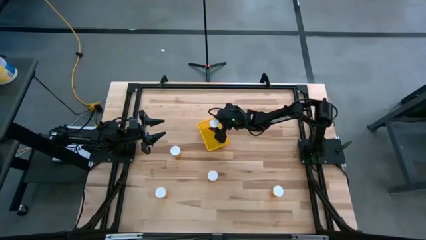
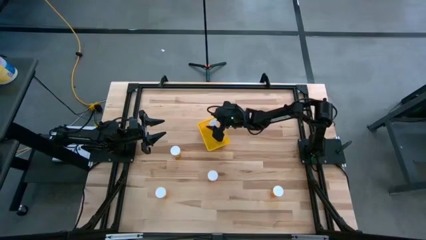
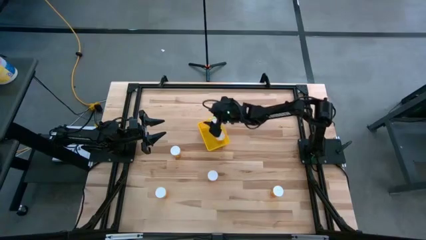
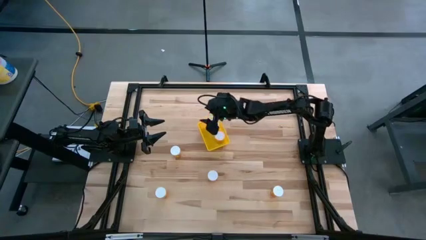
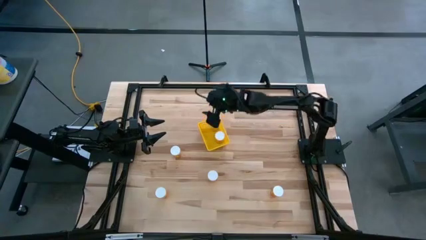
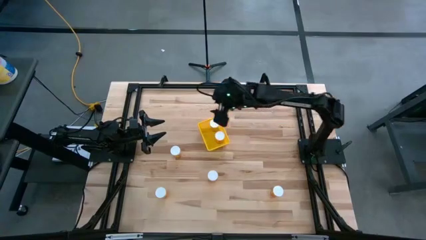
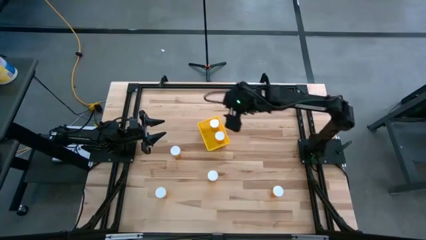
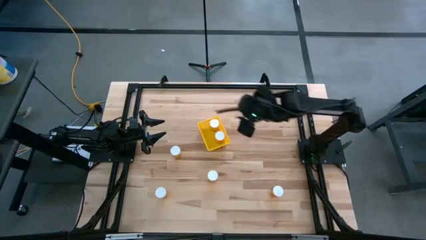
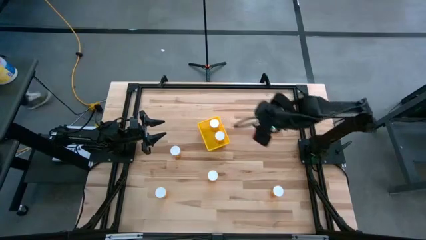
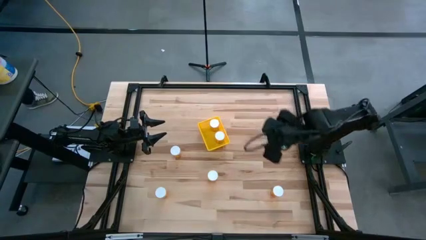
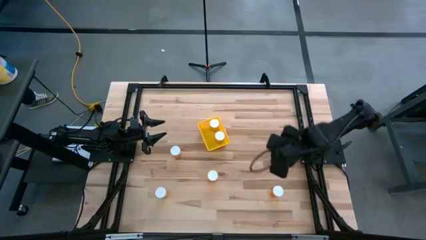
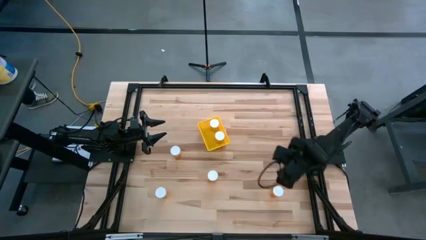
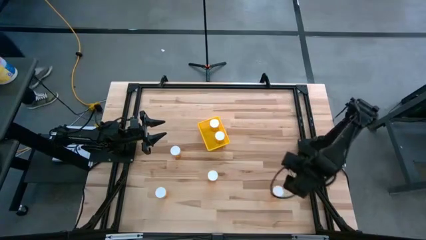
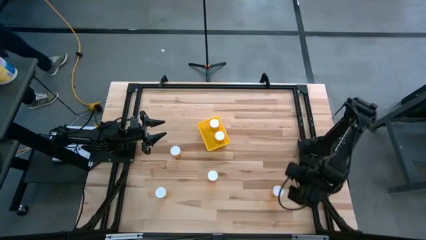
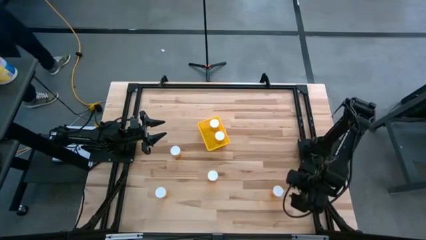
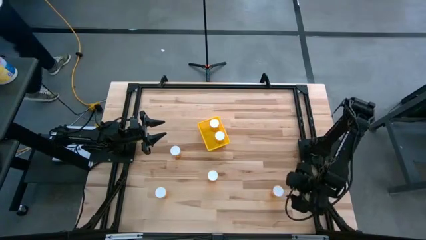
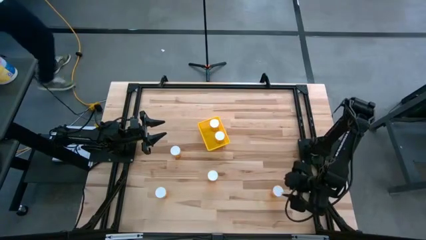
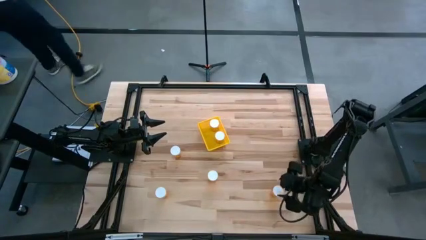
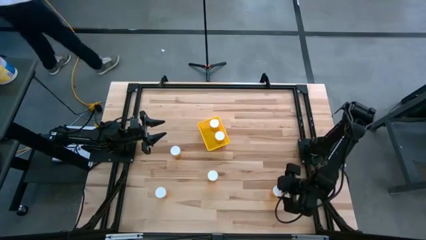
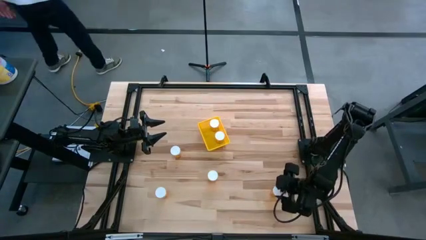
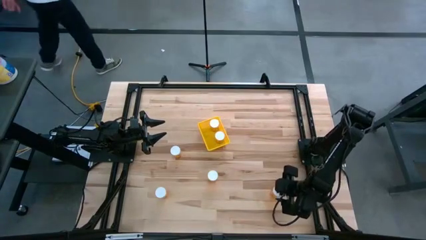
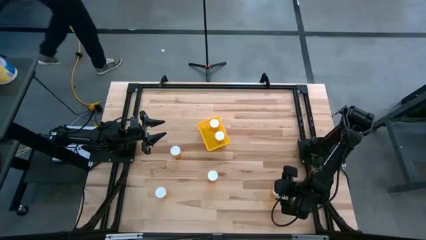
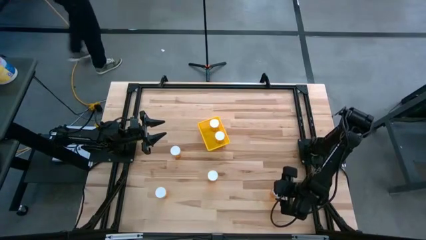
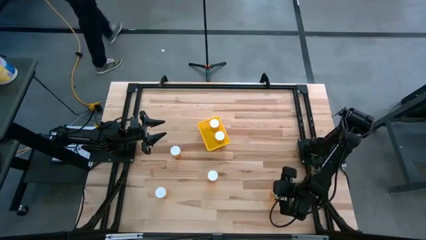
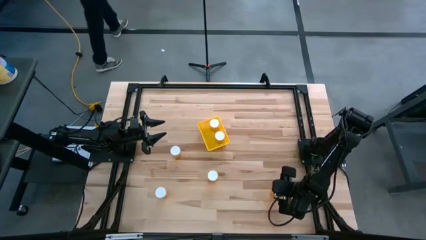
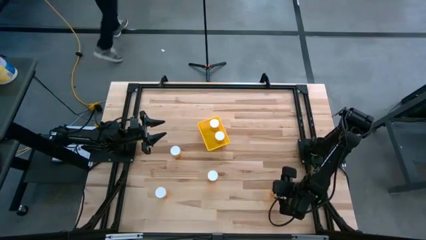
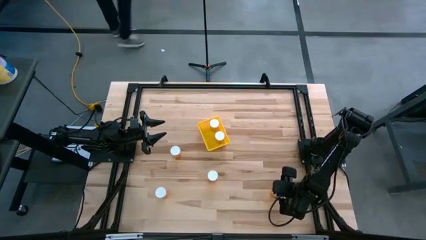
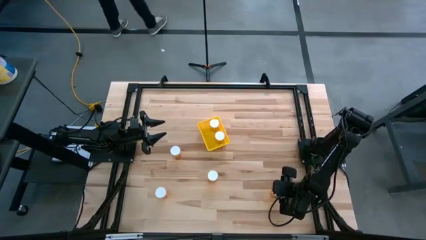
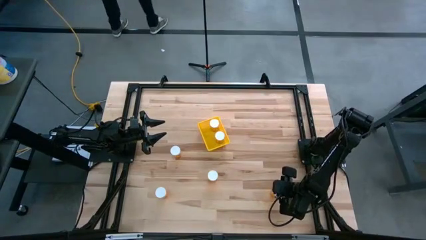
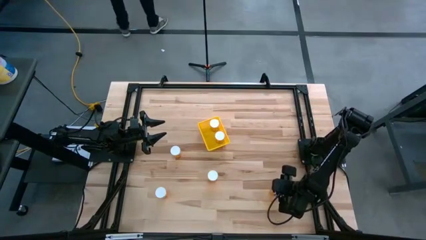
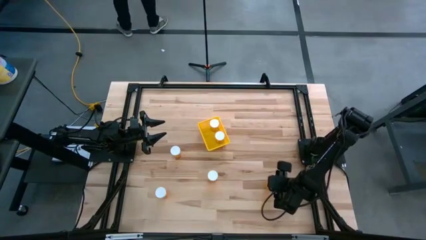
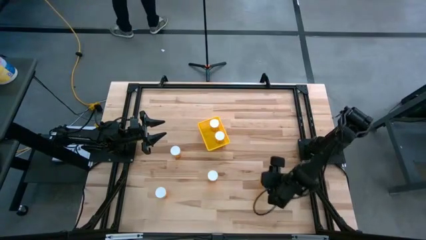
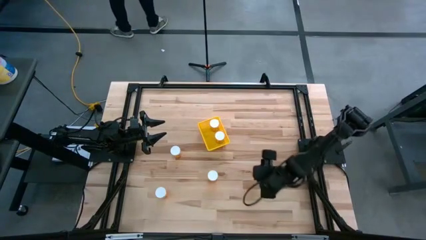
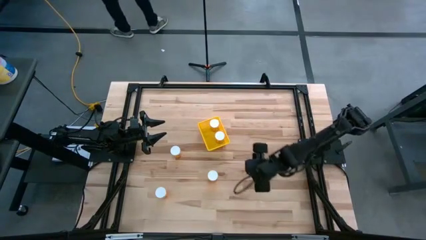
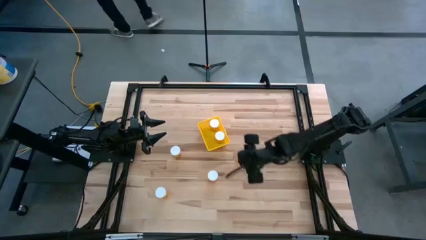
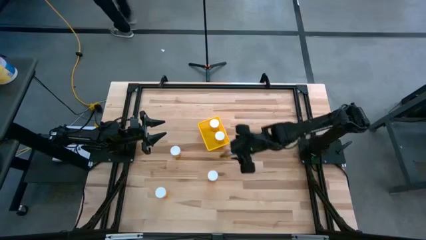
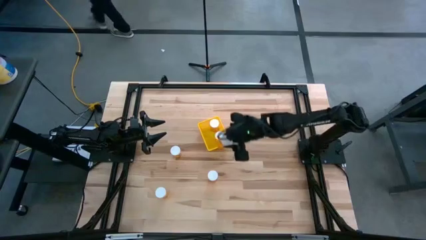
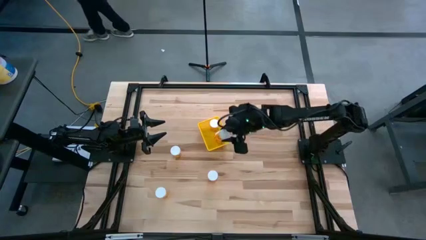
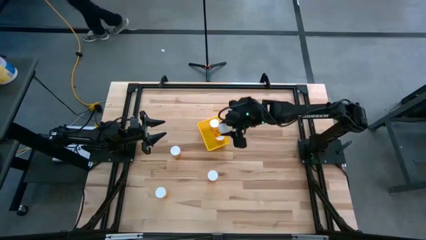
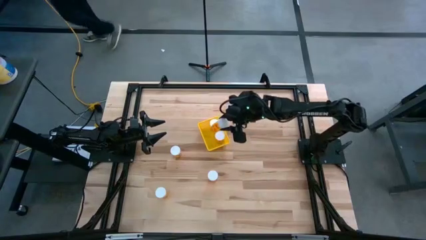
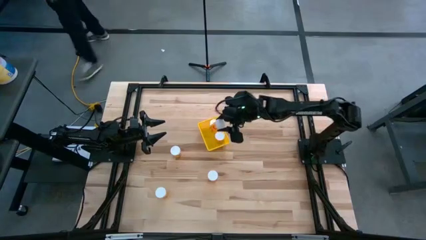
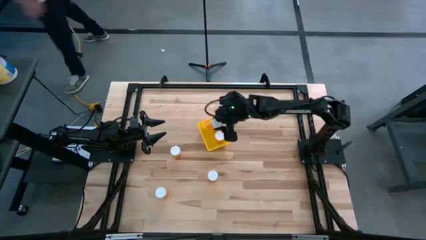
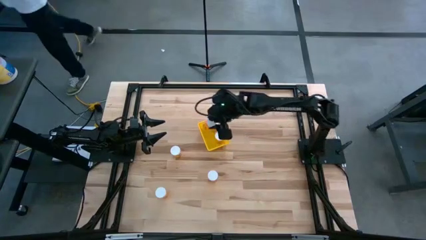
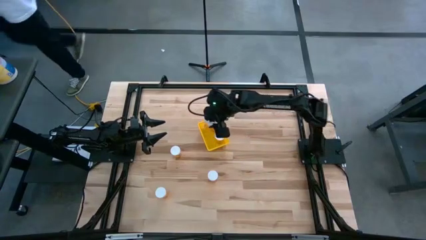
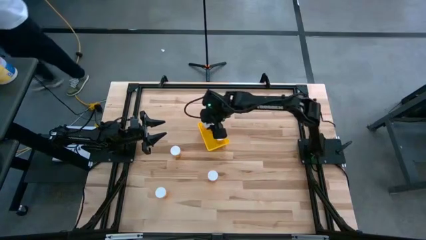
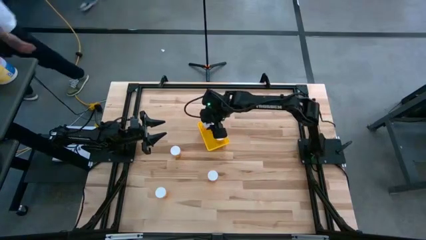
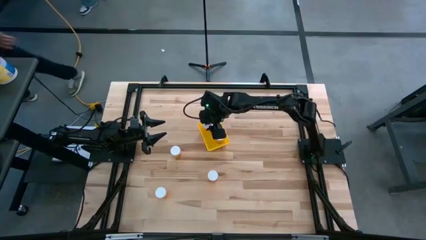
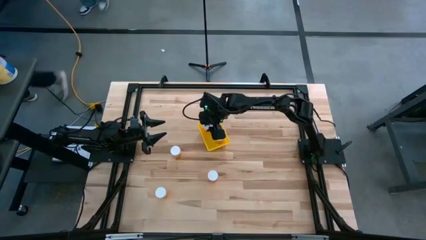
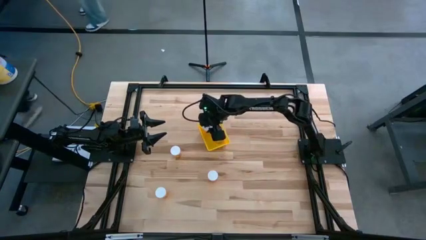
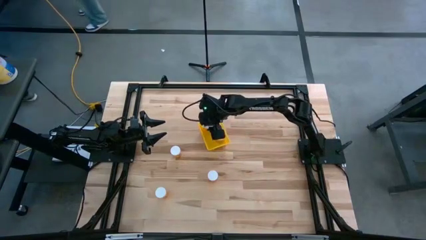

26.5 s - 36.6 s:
Task: Pick and place pill bottles into a basket
Put the orange pill bottle into the yellow bin

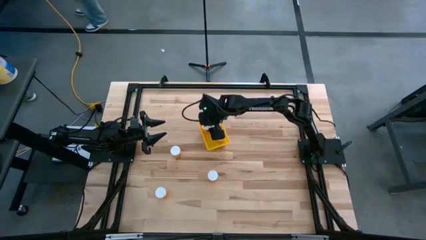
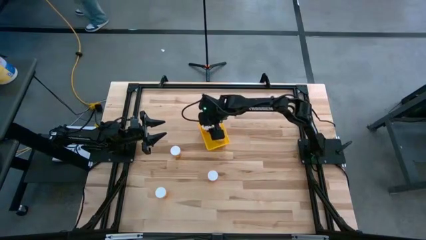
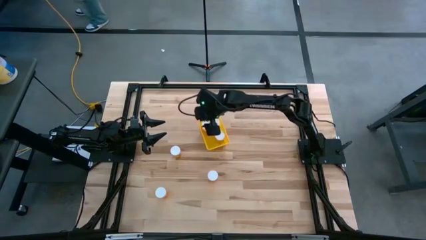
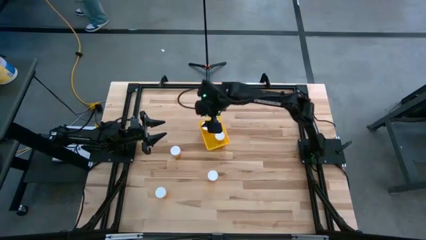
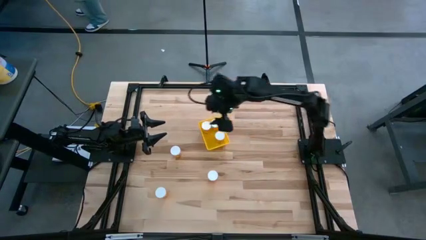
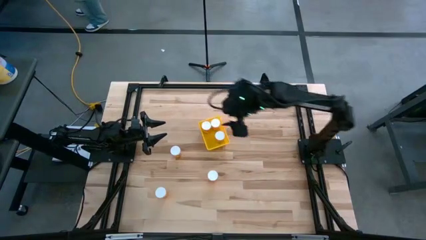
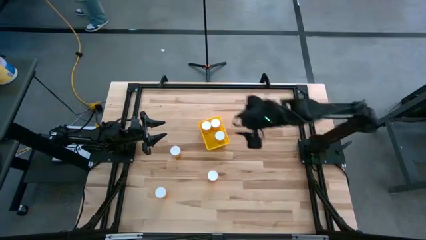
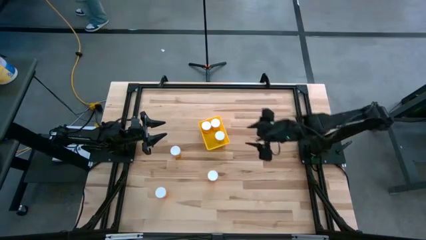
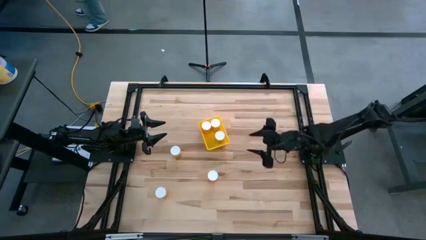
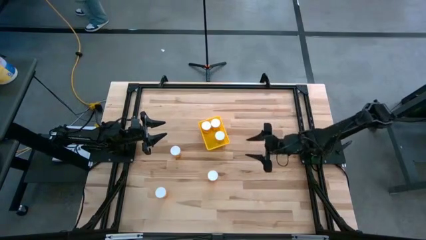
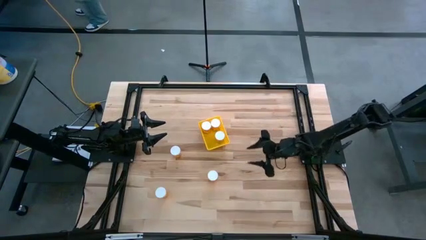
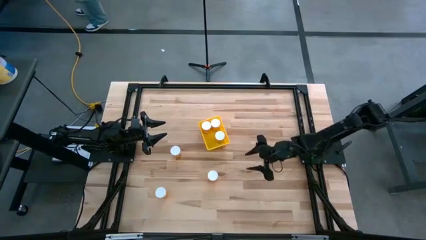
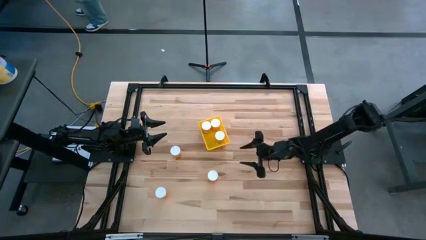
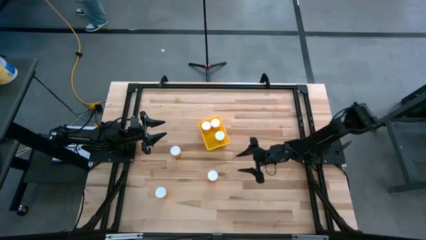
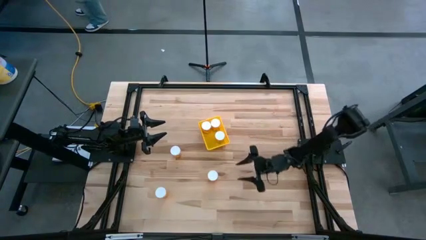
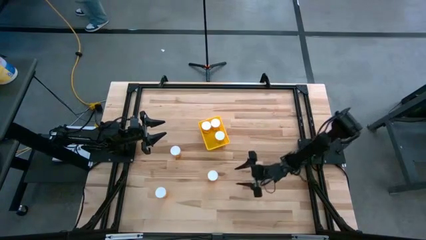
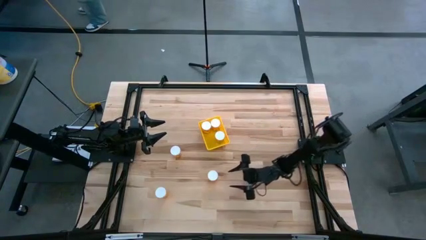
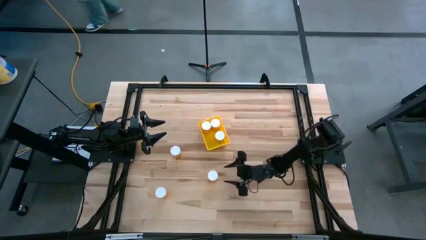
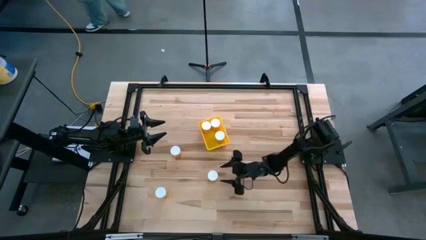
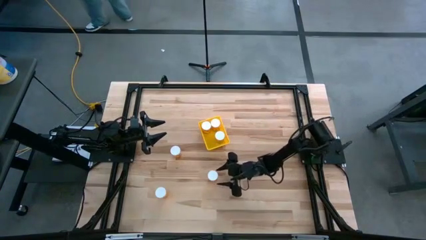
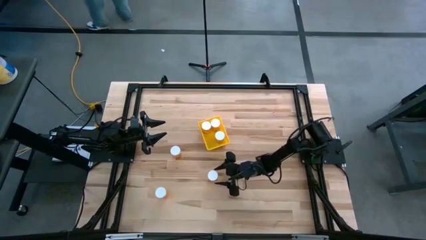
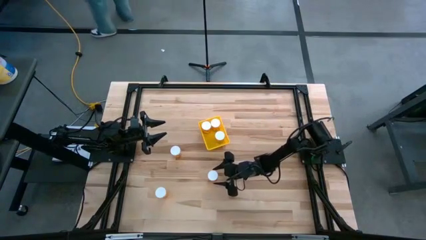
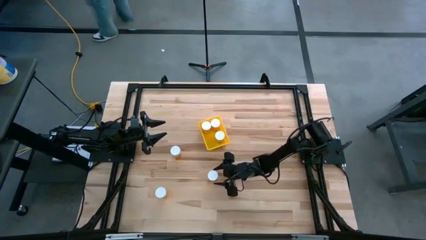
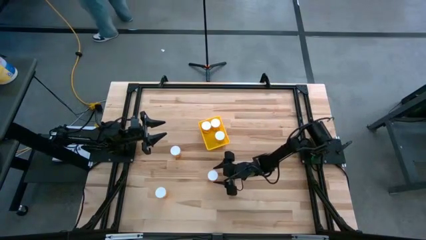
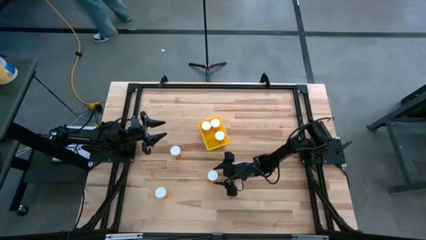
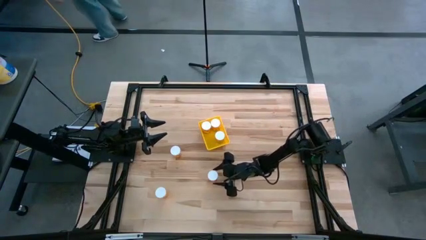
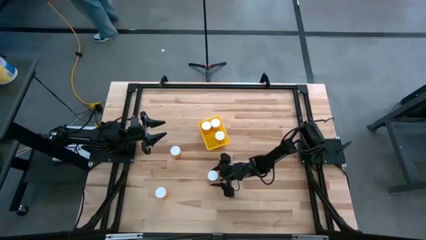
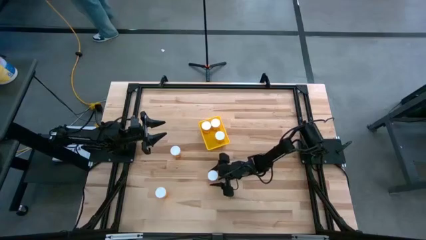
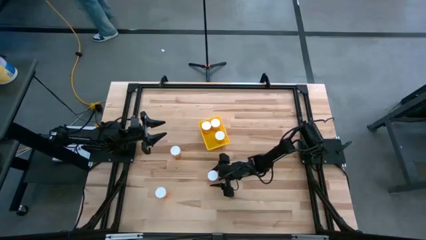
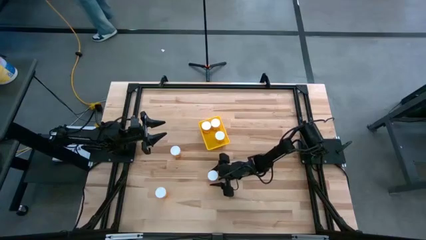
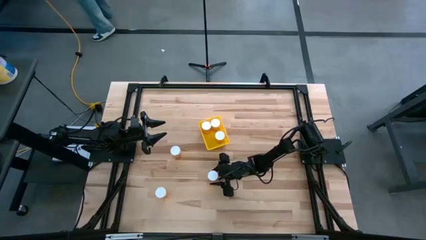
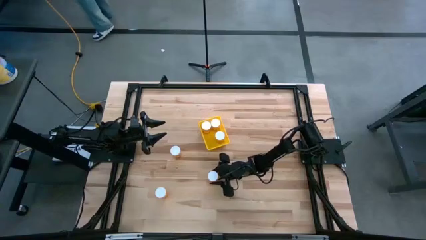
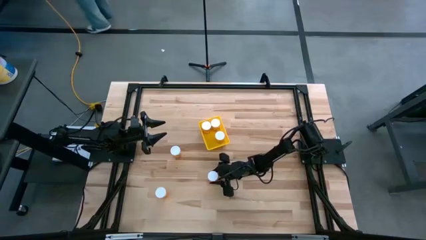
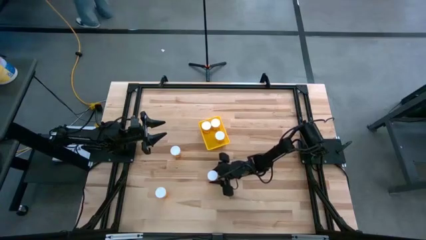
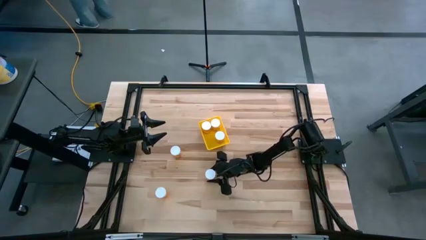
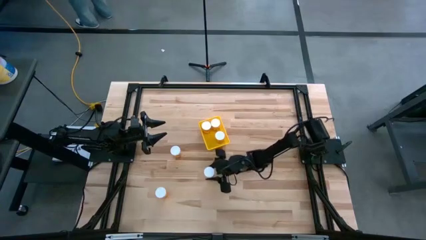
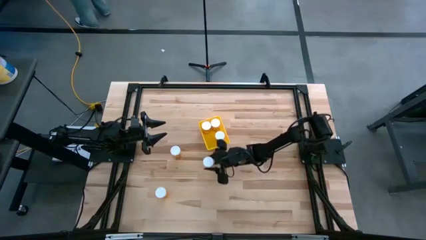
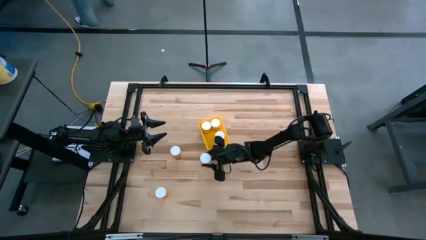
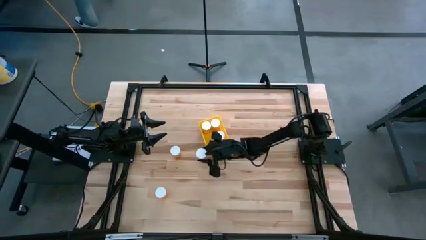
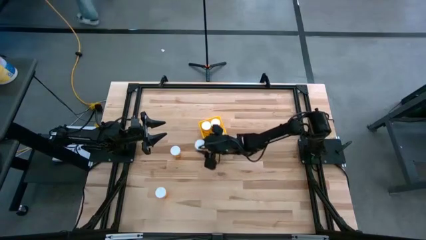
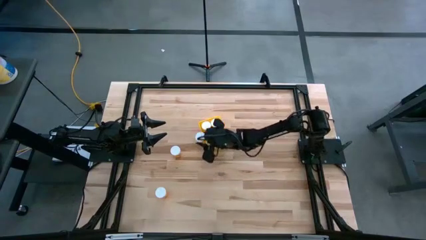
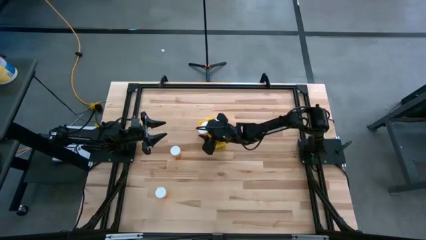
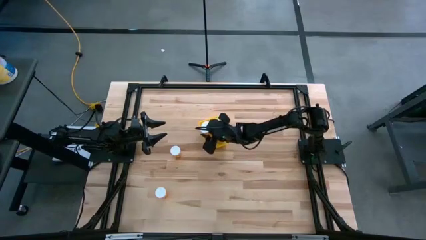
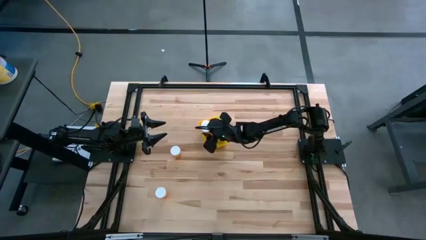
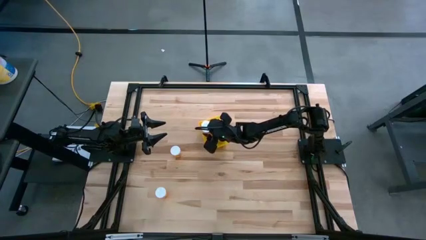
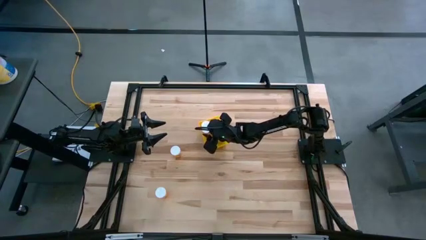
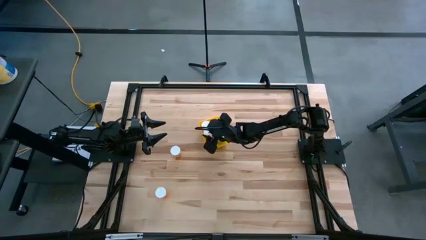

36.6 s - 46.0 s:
Put the orange pill bottle into the yellow bin
